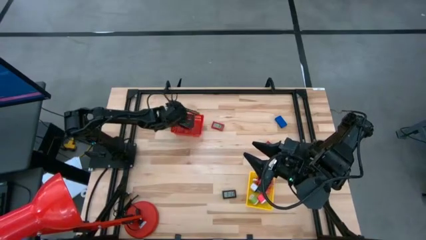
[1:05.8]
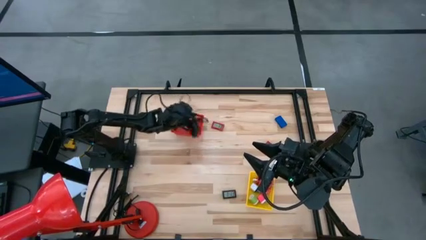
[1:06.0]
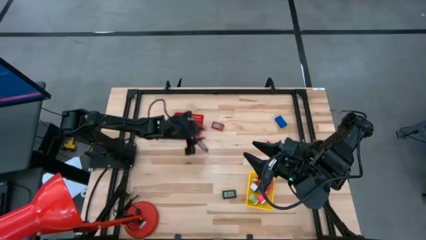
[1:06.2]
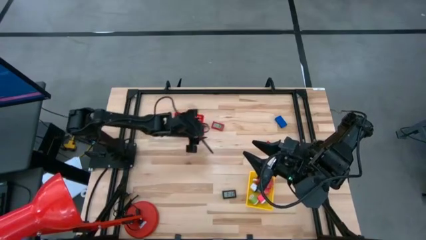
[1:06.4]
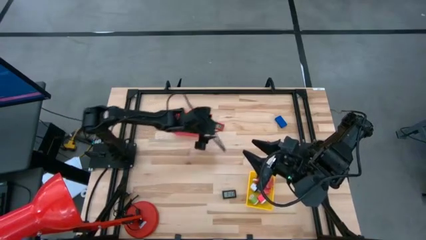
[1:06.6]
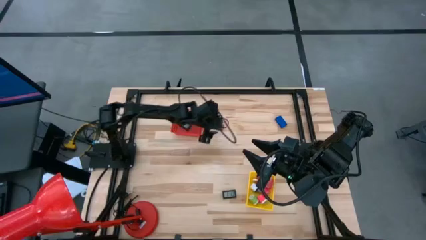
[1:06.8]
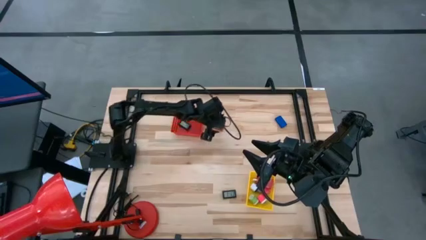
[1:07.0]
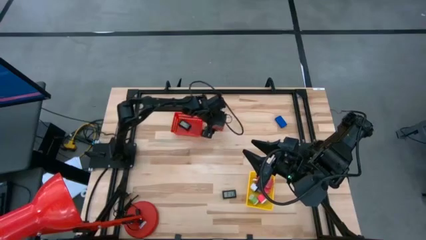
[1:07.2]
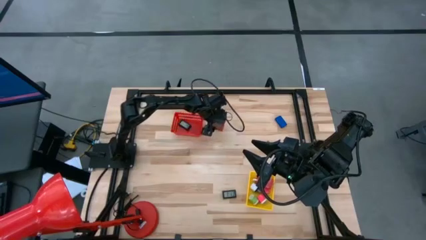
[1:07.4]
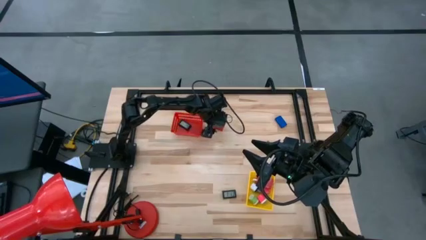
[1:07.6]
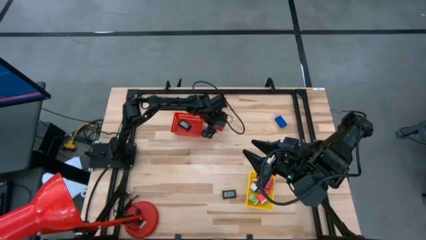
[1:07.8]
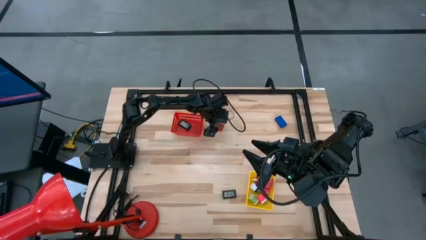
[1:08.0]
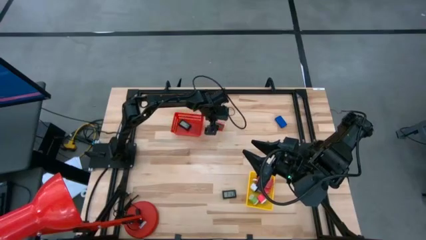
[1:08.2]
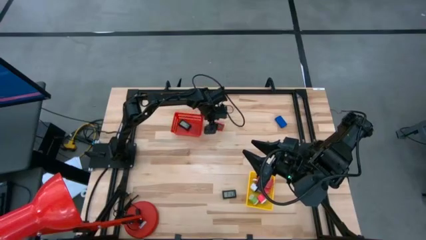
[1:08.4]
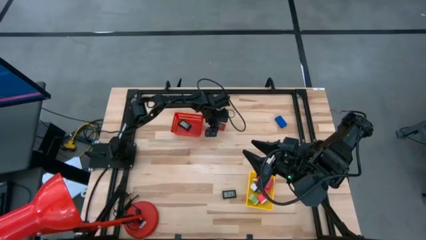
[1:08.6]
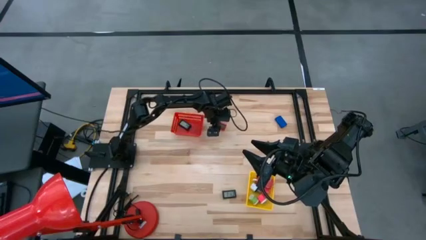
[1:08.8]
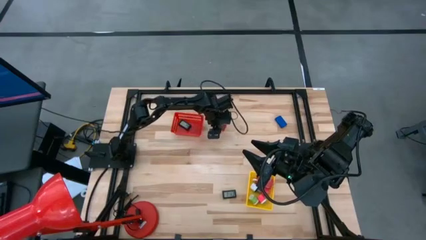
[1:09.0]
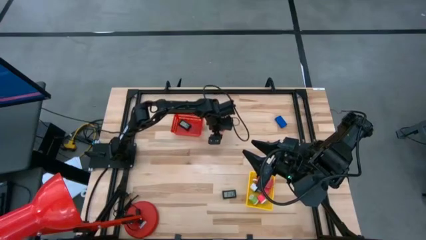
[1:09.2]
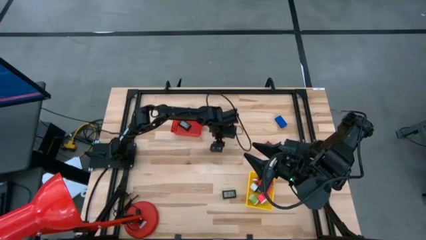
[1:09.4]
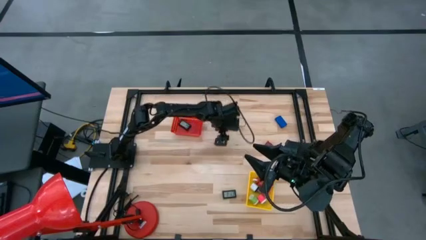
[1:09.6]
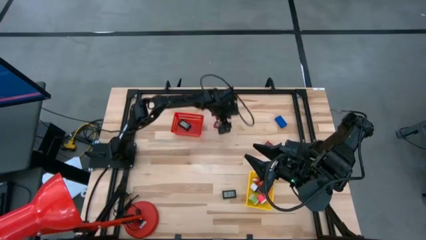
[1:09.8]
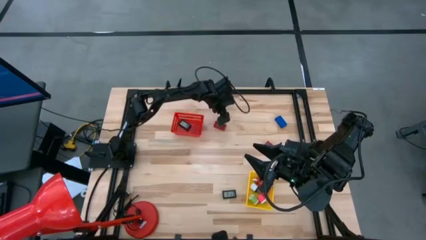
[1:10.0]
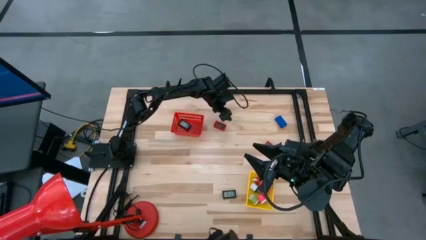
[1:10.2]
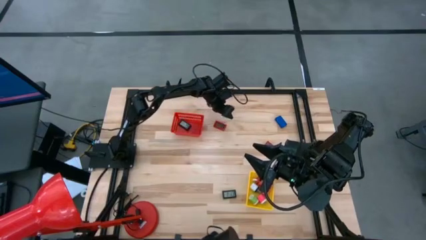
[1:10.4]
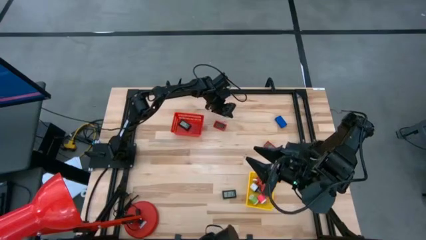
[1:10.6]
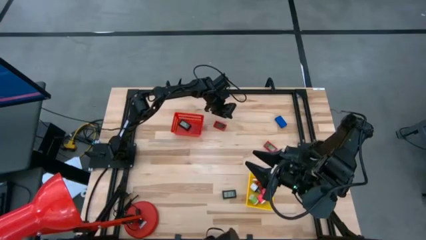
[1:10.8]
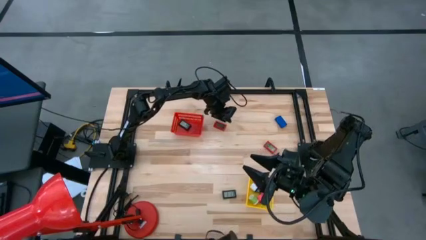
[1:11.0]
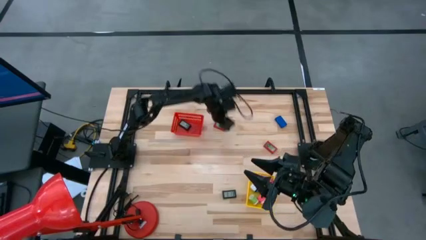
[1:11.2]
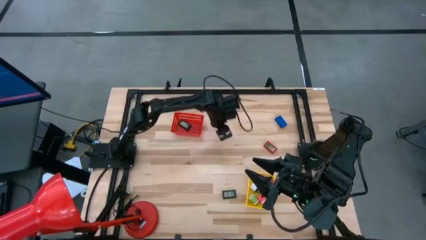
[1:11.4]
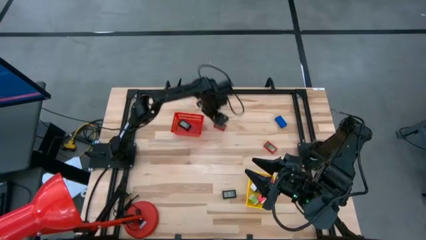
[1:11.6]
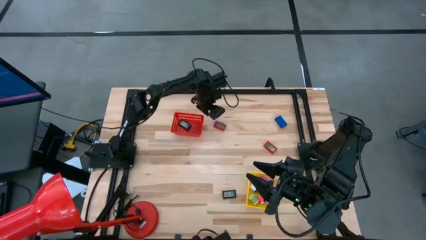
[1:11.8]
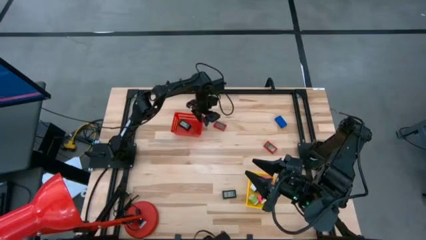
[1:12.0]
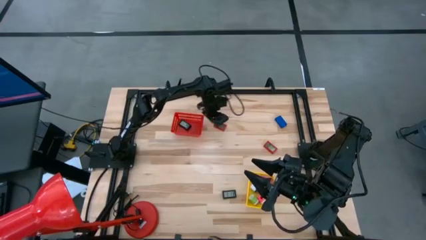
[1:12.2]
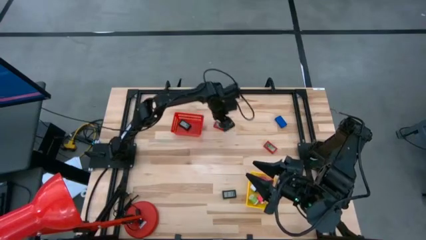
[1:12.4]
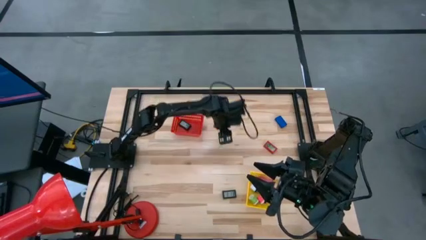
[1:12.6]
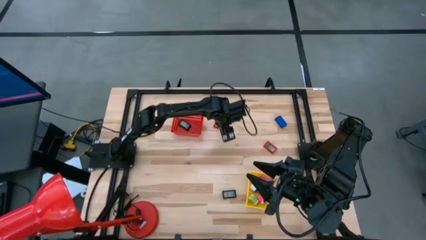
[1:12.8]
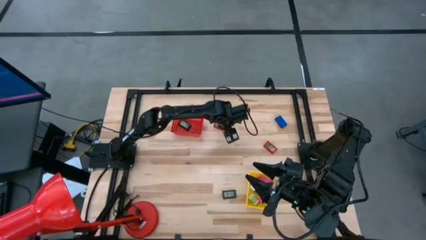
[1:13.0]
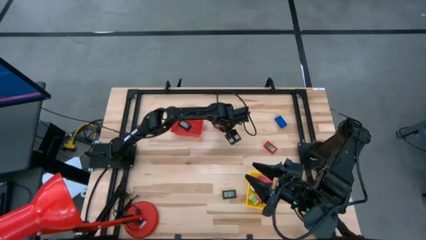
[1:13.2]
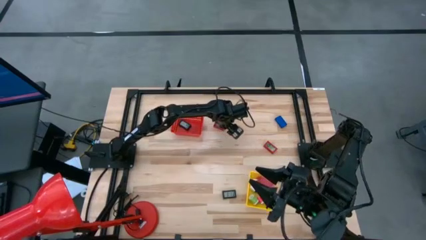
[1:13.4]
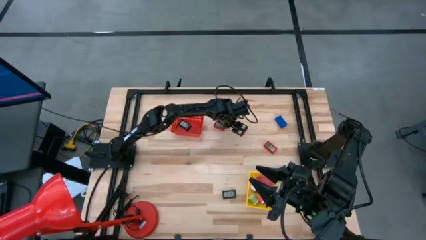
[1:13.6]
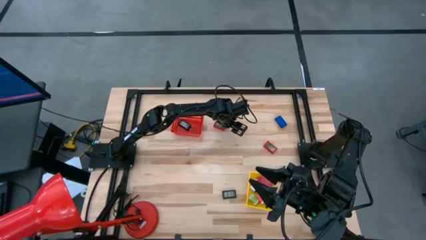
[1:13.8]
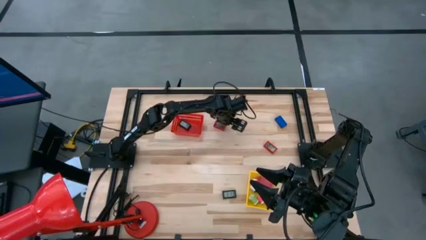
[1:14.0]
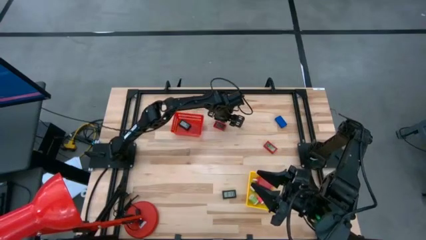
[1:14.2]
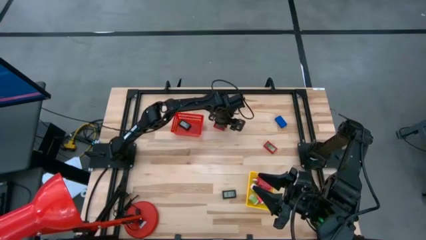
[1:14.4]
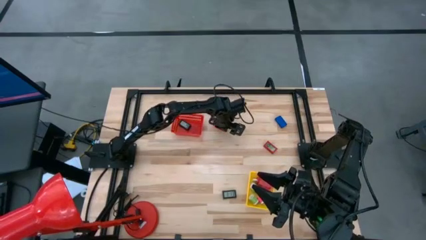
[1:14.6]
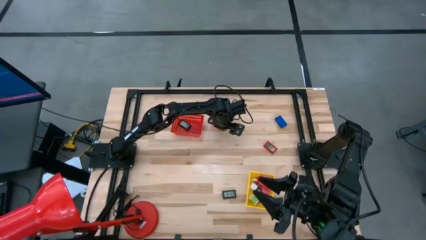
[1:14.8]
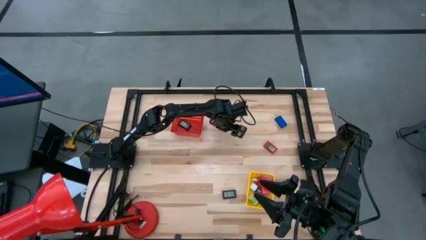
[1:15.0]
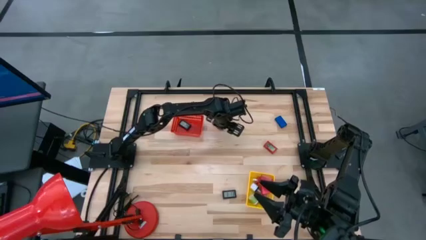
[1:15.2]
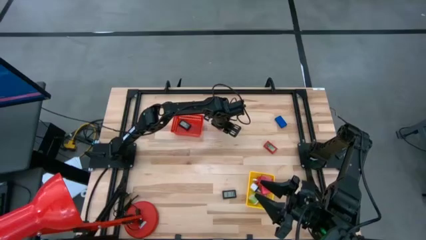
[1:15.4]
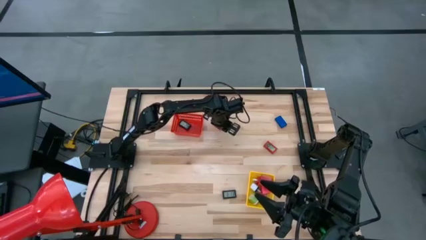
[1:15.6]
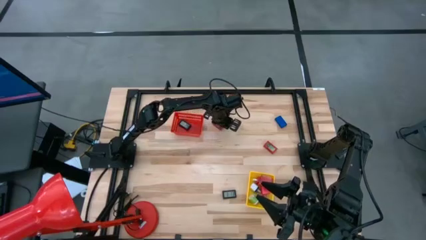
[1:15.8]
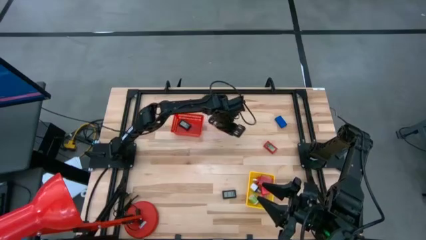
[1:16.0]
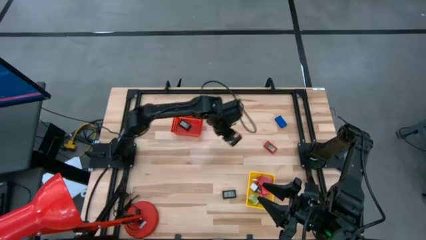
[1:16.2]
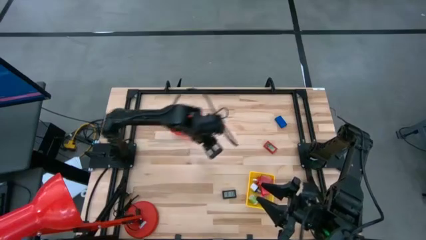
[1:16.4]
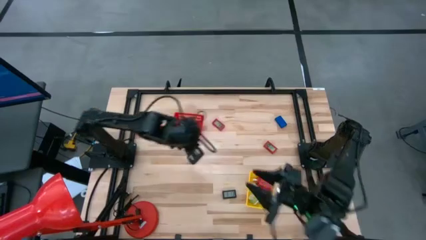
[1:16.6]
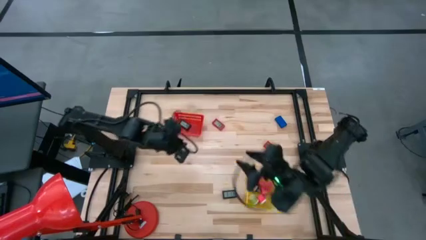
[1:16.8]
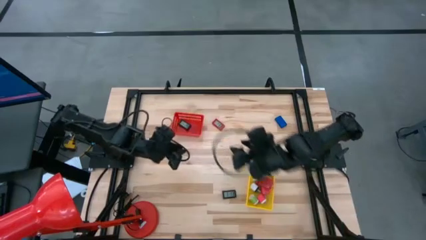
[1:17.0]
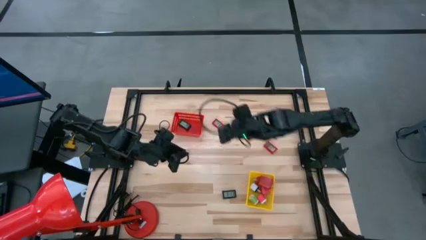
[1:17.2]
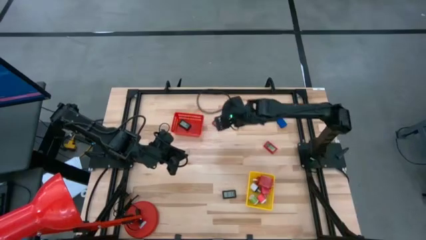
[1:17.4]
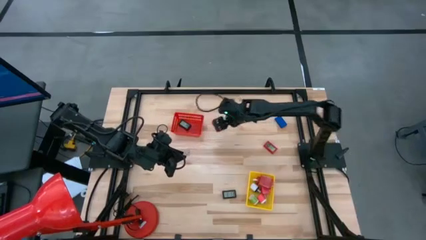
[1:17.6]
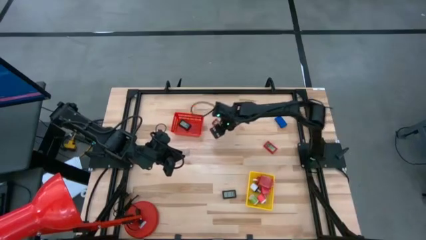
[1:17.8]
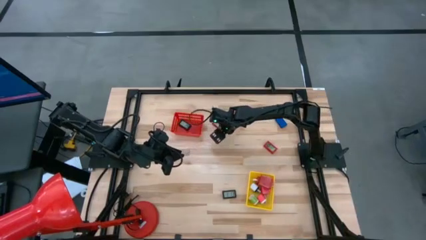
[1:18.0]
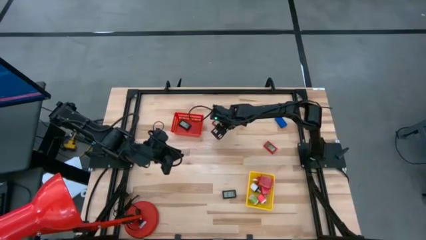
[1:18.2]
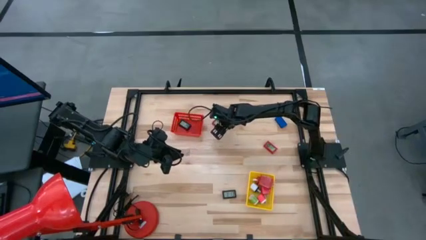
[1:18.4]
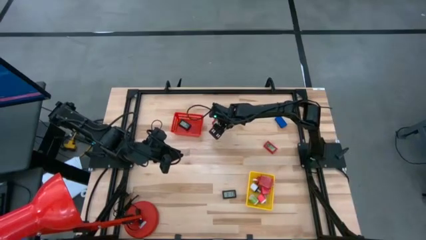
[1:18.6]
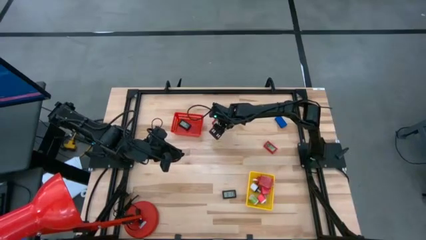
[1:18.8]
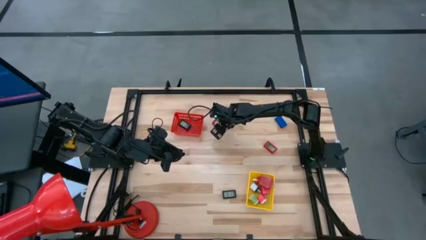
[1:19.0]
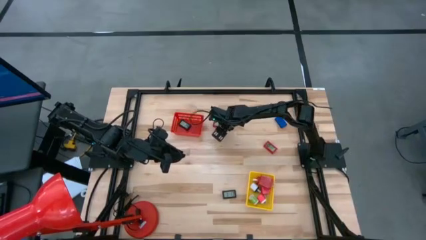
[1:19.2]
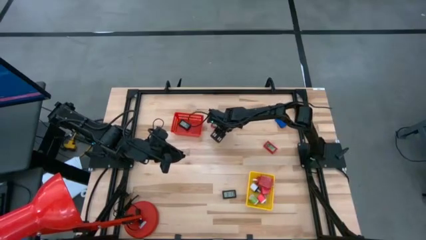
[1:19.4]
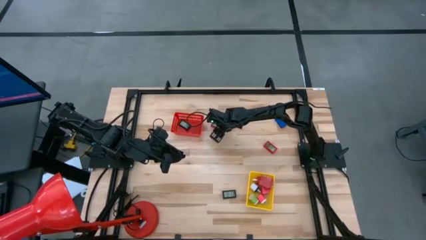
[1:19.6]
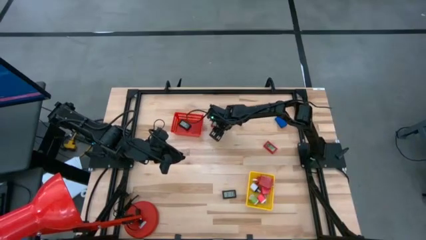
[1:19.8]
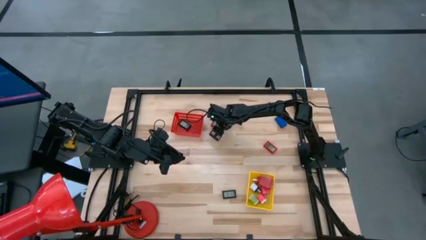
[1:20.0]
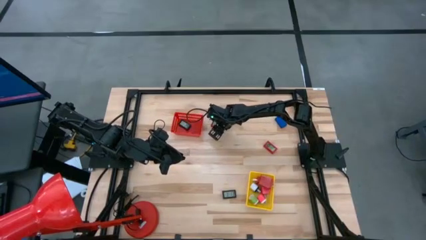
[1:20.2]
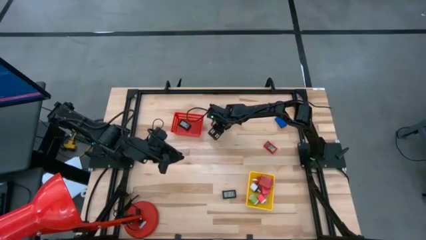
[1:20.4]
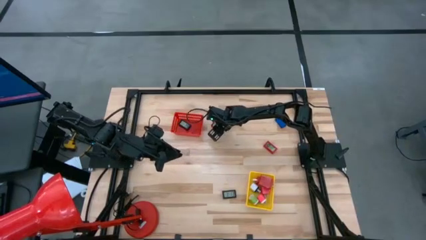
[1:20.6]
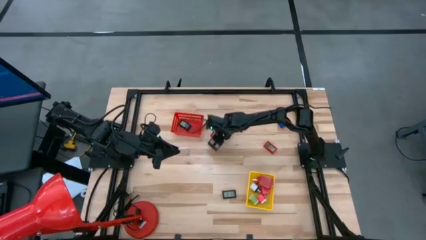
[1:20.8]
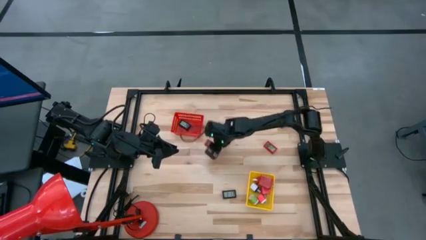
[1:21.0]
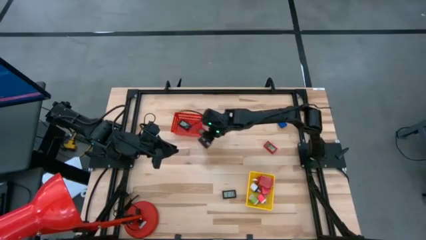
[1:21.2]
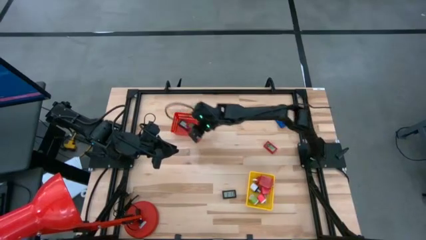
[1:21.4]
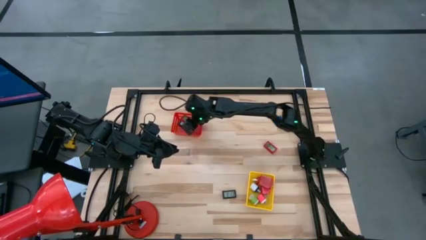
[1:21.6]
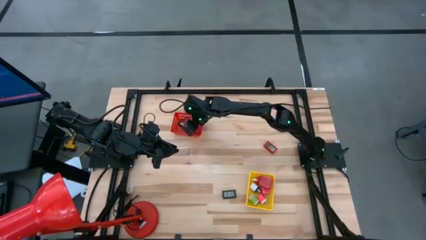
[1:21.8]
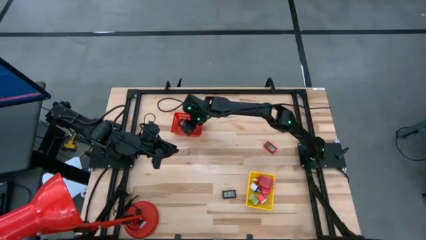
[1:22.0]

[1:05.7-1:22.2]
Task: Pick & Place Office items
Put the top left red digital clock into the red basket
